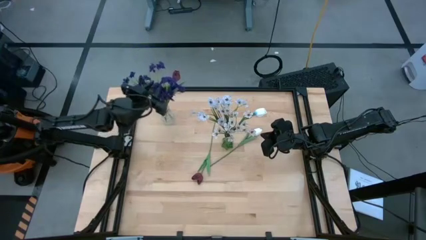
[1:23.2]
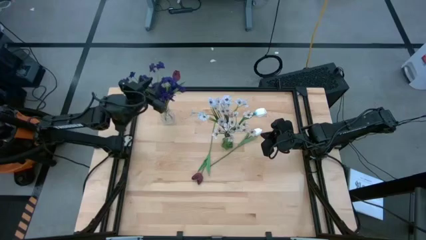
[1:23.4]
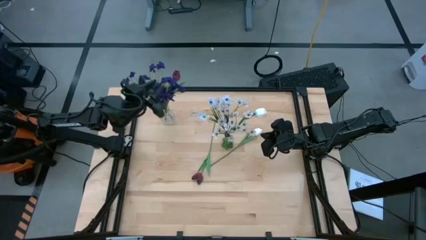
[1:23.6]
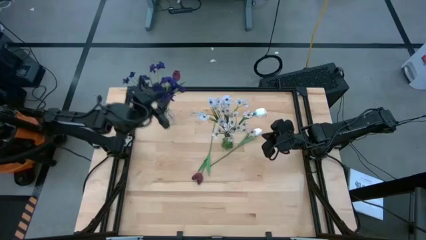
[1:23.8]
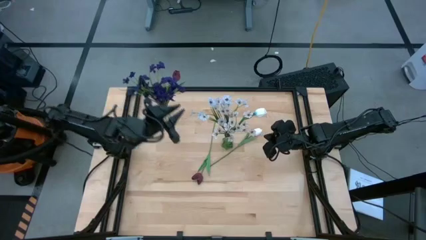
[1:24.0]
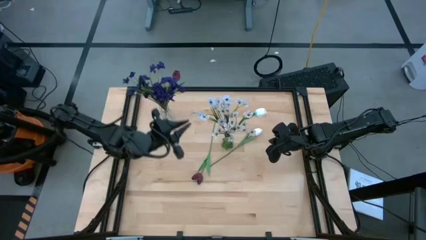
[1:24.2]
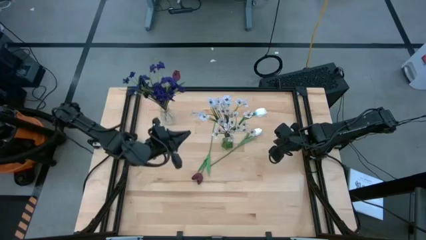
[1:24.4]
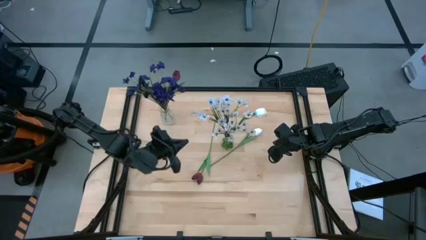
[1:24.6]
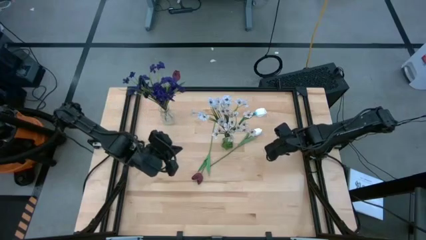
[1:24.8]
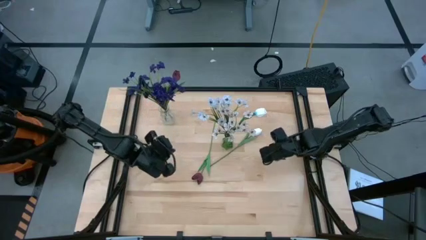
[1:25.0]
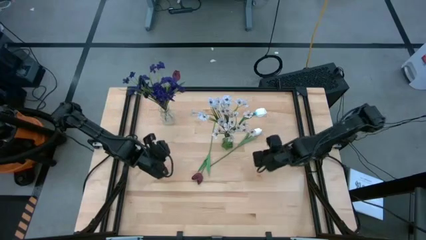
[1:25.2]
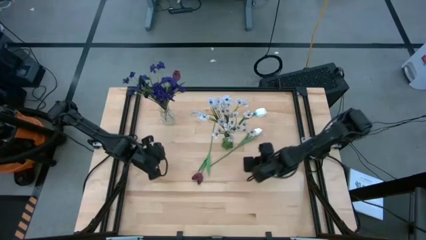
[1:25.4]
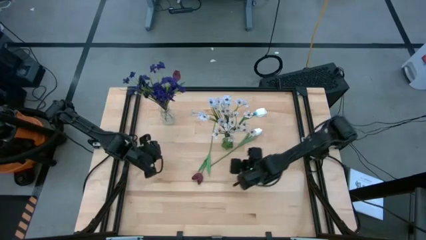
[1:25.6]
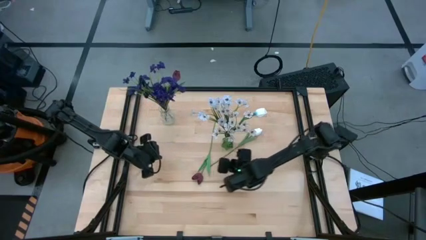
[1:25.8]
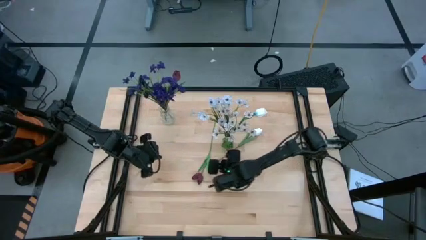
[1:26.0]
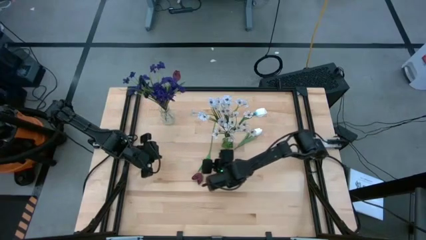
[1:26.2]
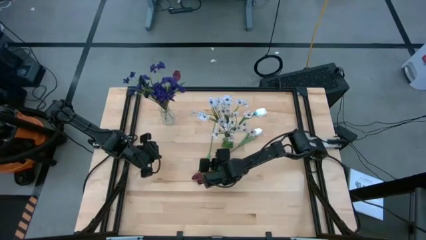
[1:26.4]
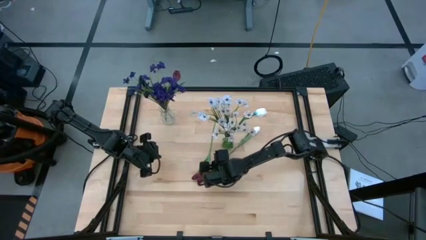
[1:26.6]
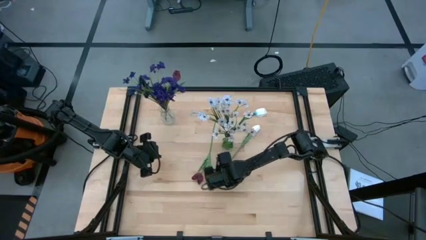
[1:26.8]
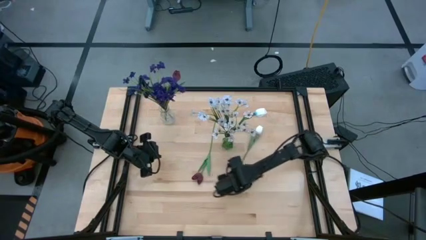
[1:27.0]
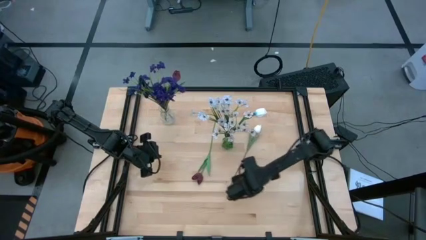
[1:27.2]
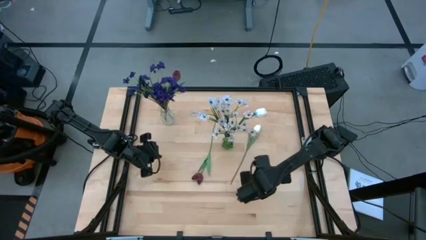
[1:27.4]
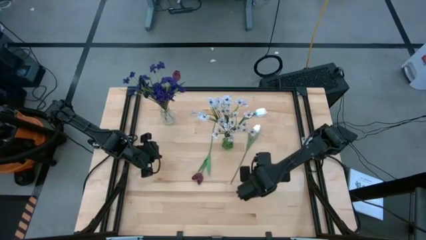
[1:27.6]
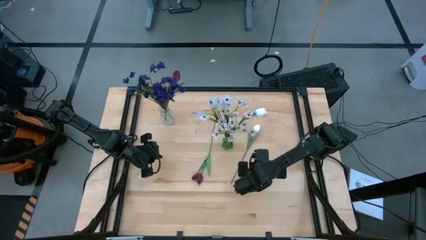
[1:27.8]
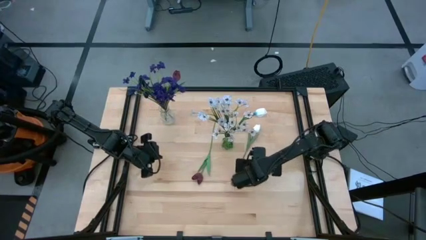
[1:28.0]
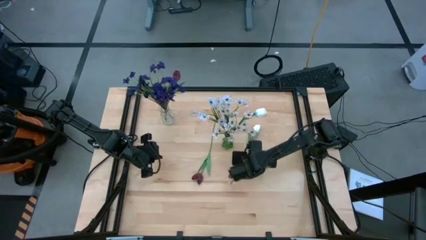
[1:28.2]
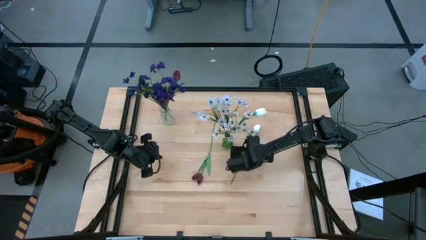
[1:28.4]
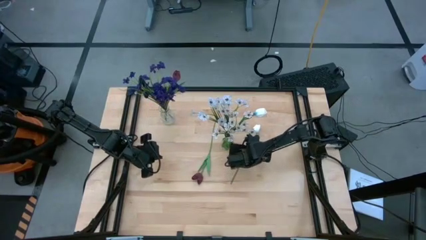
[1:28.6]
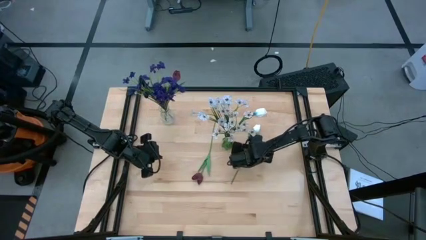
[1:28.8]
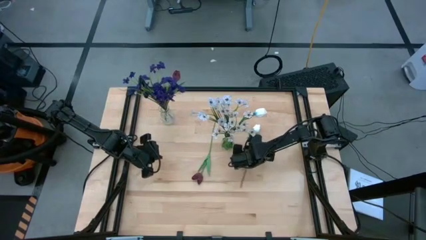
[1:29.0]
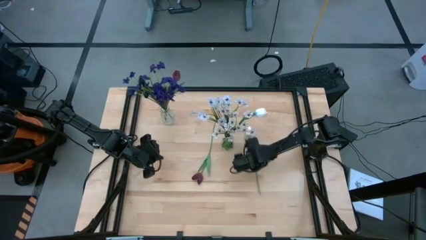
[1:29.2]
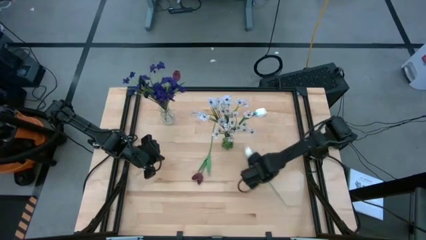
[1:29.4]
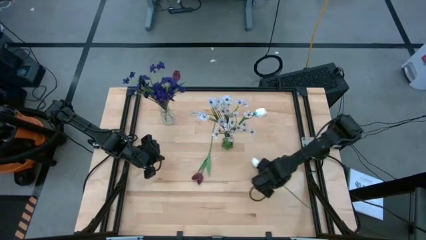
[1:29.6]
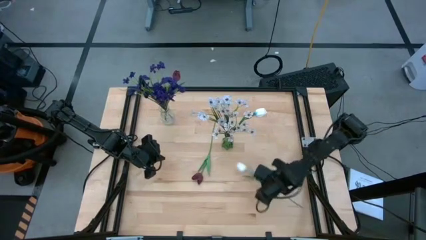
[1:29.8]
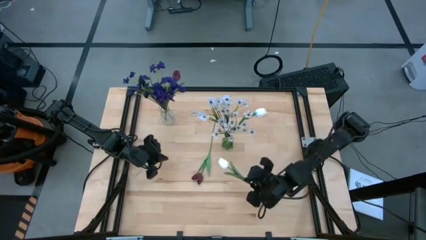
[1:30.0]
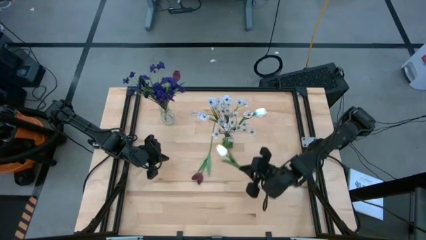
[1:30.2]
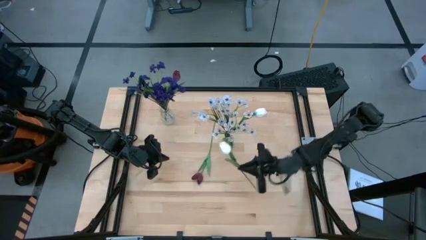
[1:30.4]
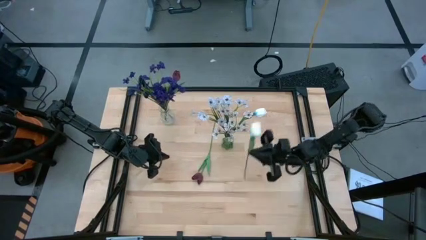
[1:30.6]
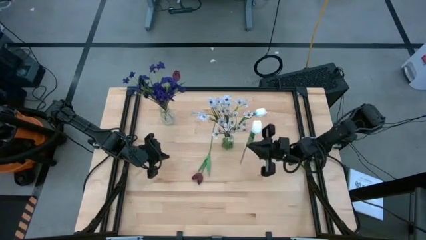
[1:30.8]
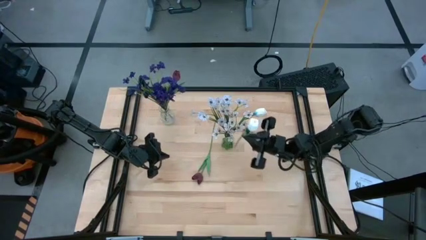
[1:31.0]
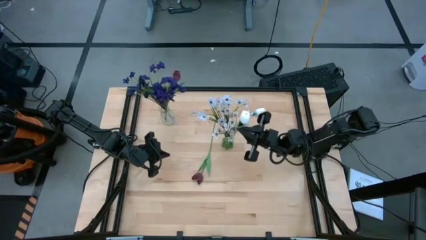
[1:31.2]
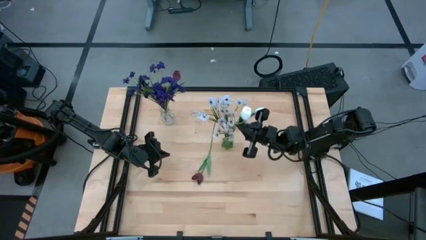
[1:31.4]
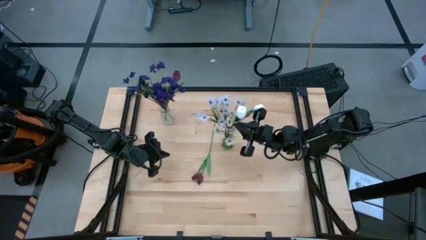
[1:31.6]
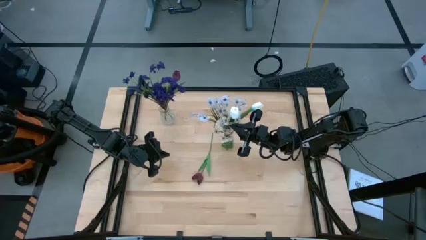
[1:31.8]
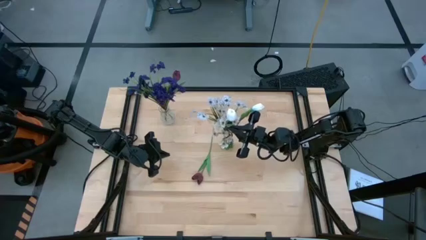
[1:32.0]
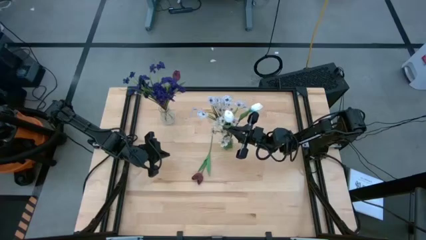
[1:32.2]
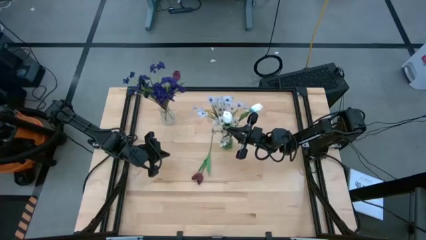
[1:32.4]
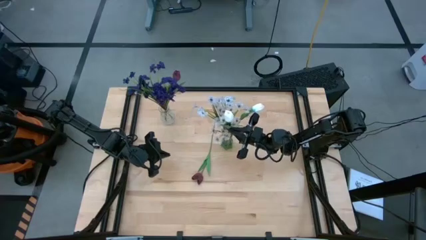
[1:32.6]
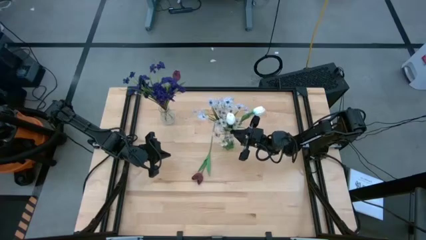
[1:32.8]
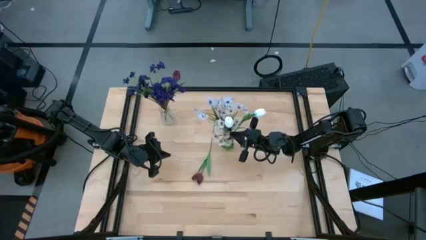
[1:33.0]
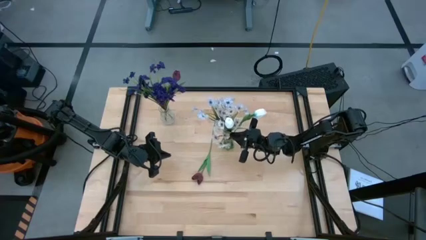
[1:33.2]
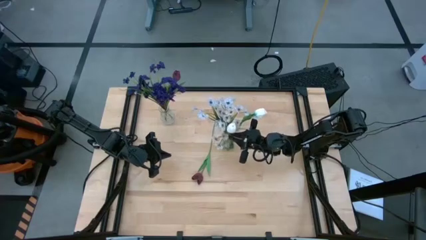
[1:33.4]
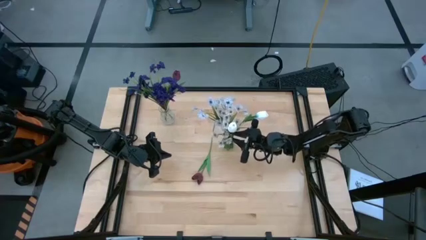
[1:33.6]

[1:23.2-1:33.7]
Task: Sort flowers into vase by color
Put the white flower into the green vase

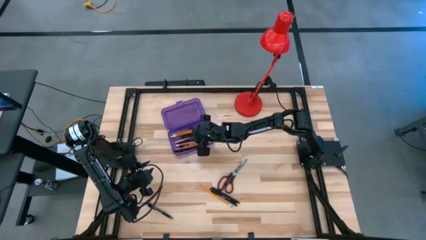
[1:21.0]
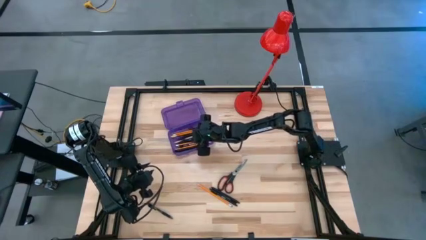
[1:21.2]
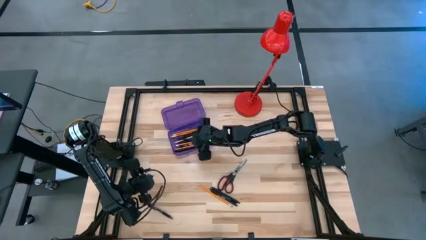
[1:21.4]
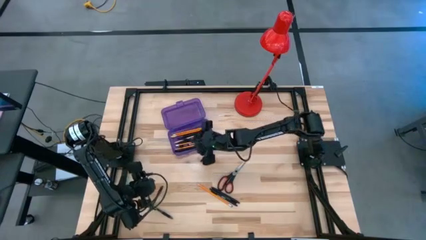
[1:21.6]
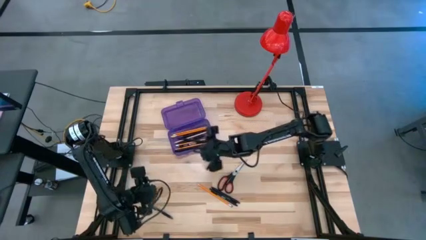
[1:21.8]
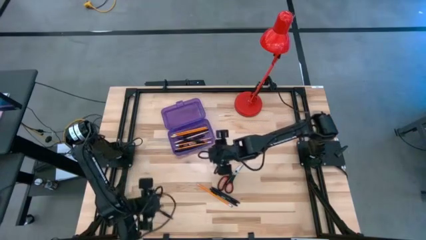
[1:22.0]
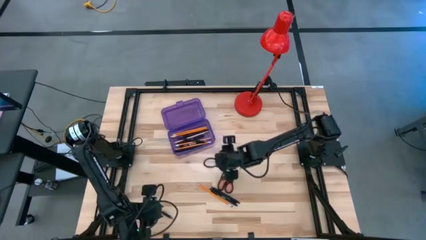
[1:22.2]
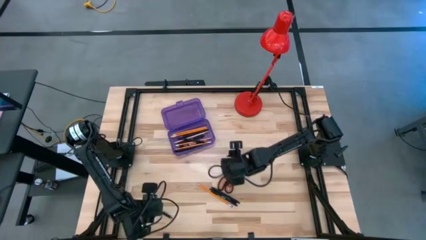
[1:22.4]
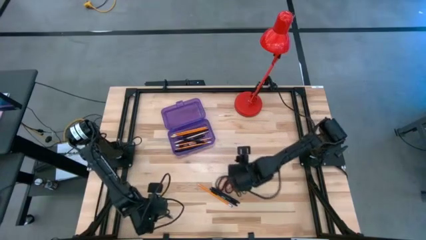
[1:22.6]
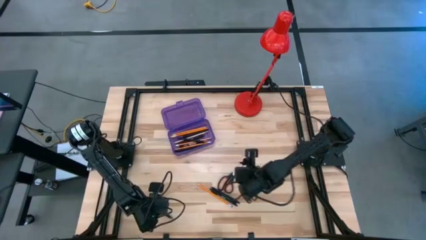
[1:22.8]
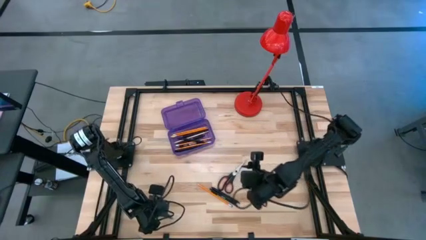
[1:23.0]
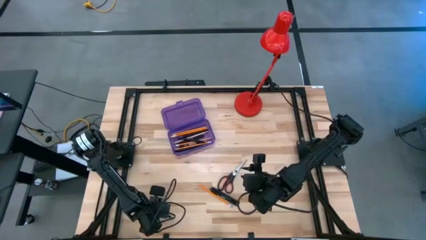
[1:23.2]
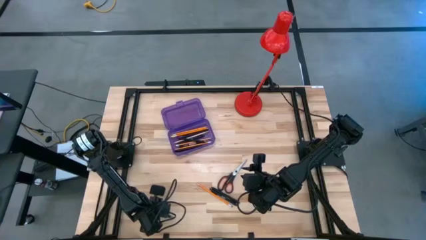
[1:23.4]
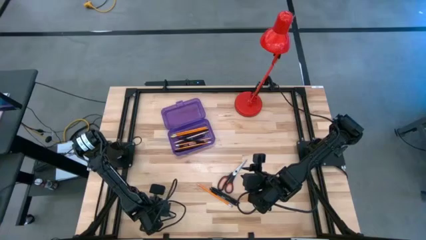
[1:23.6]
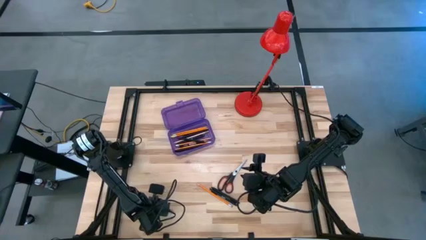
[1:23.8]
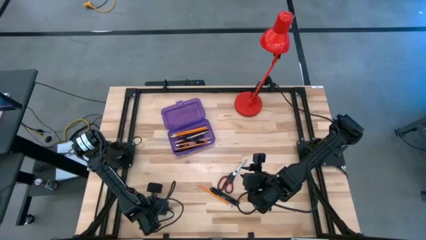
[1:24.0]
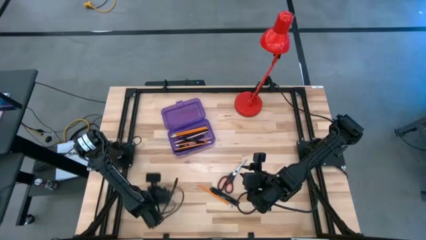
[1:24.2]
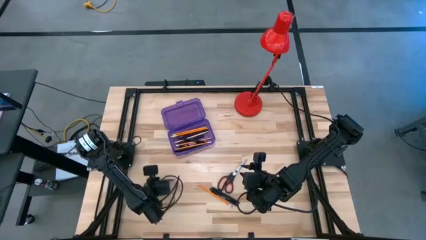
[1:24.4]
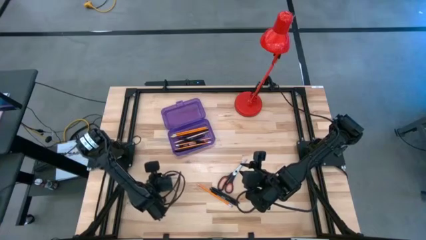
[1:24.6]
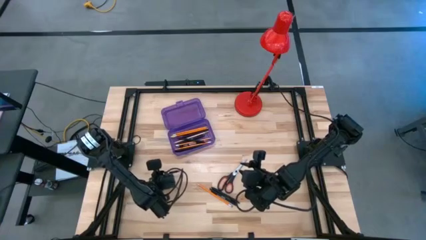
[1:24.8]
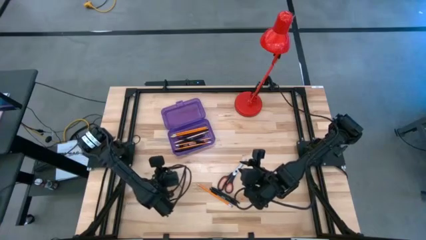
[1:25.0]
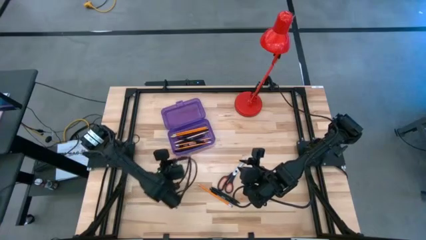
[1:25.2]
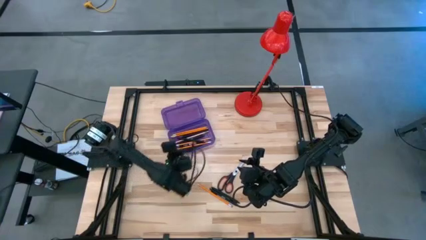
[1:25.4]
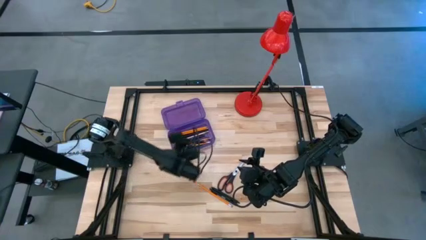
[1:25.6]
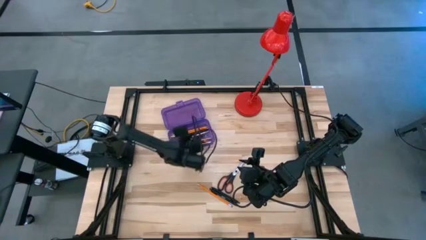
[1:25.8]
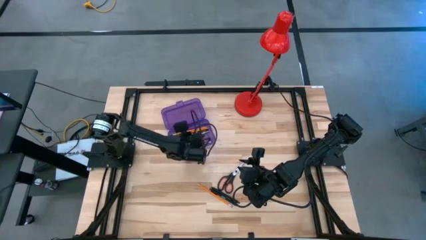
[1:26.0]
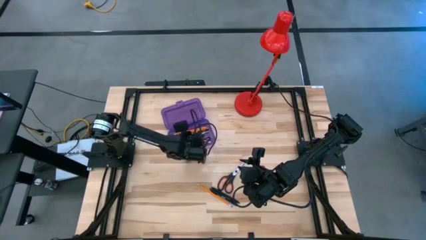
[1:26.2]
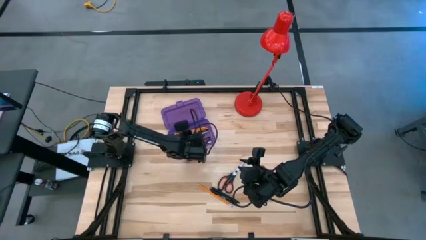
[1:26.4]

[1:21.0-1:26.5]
Task: Pick & place school supplies into a supply box
Put the transparent pen into the purple supply box
